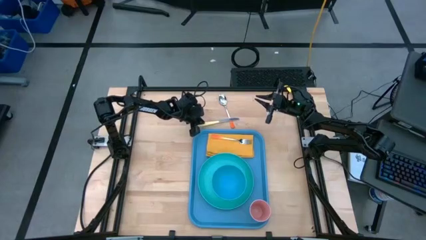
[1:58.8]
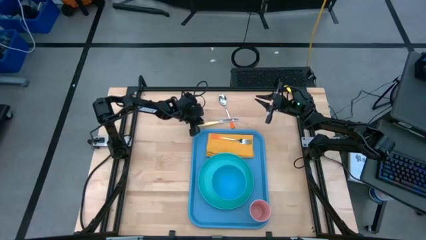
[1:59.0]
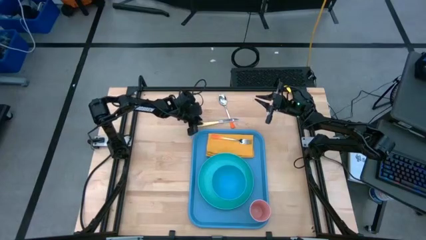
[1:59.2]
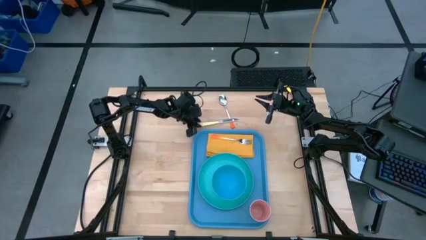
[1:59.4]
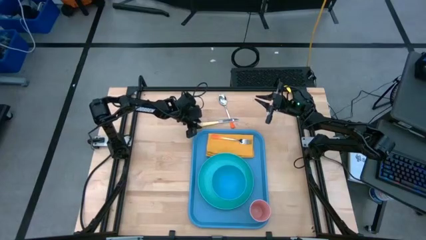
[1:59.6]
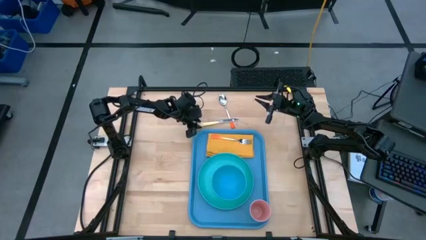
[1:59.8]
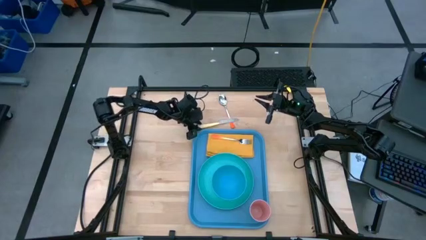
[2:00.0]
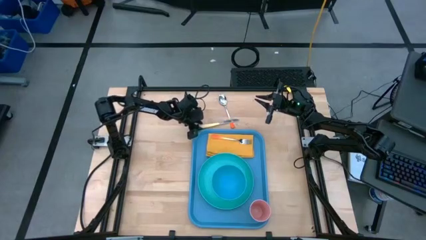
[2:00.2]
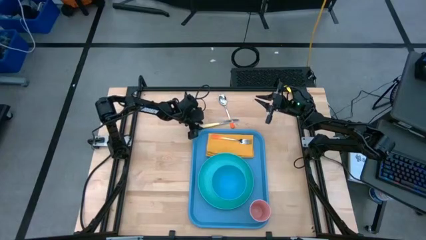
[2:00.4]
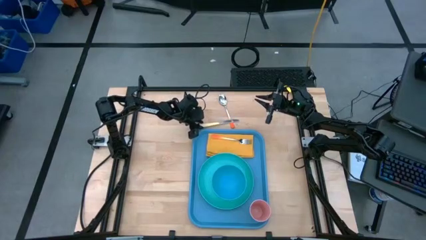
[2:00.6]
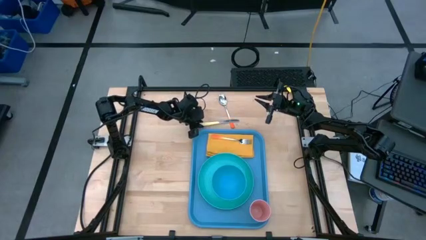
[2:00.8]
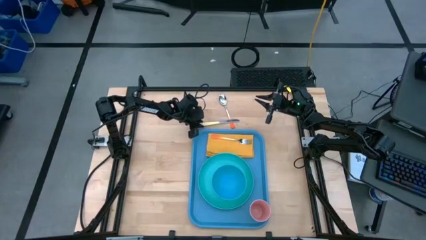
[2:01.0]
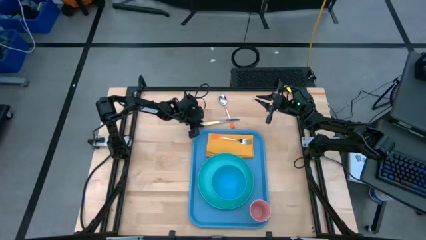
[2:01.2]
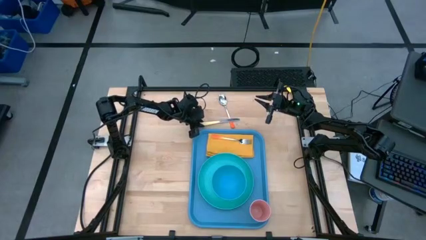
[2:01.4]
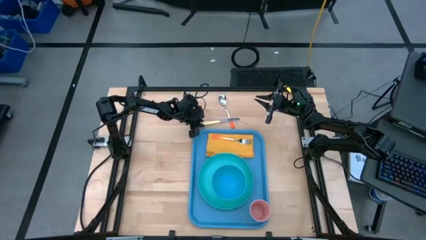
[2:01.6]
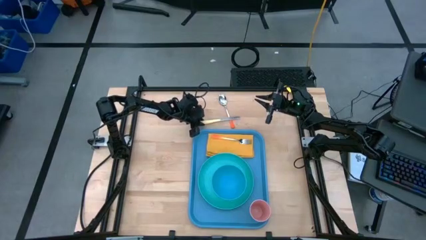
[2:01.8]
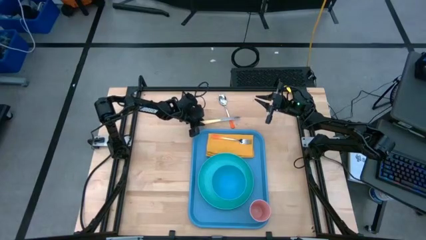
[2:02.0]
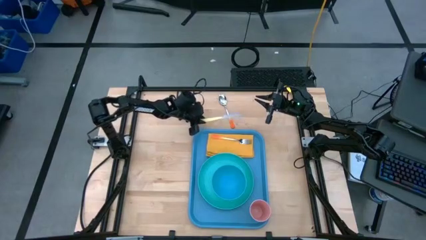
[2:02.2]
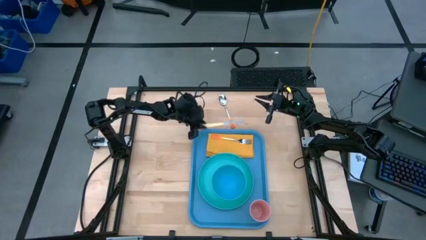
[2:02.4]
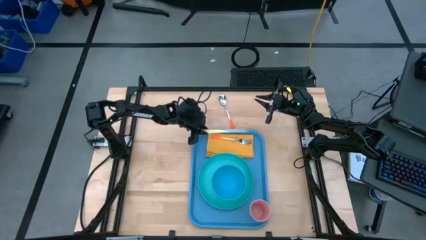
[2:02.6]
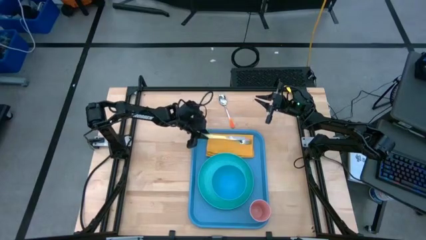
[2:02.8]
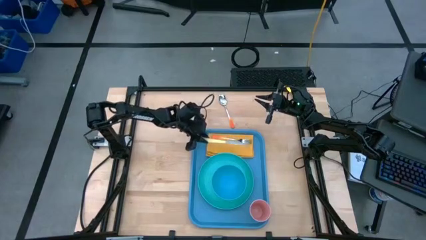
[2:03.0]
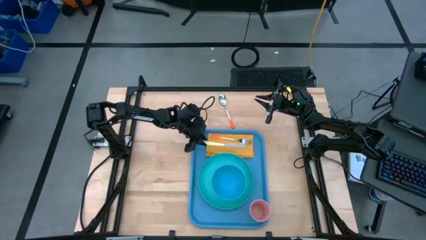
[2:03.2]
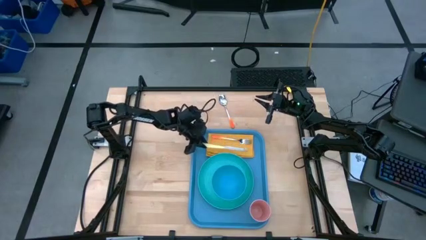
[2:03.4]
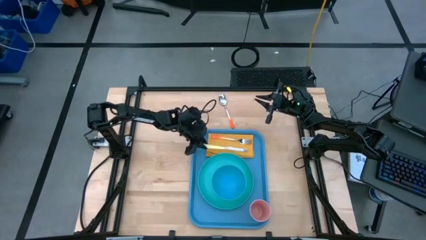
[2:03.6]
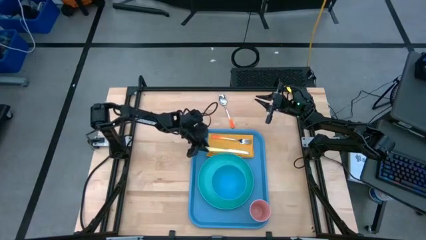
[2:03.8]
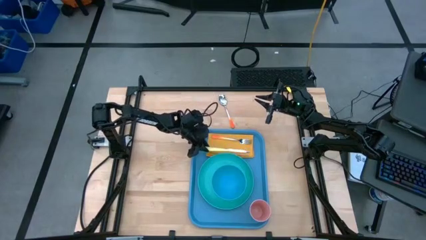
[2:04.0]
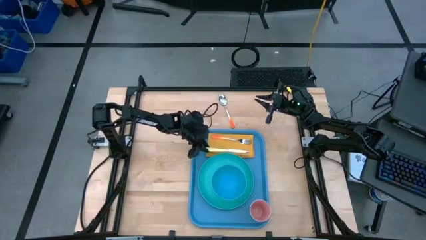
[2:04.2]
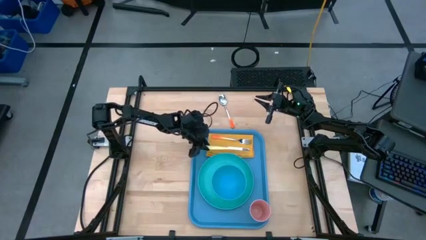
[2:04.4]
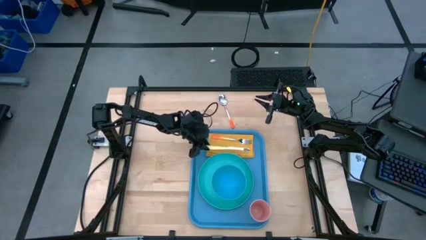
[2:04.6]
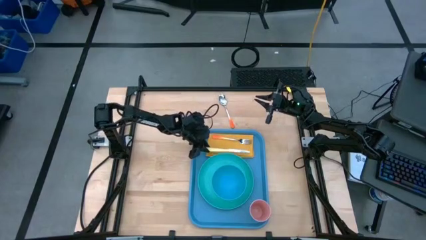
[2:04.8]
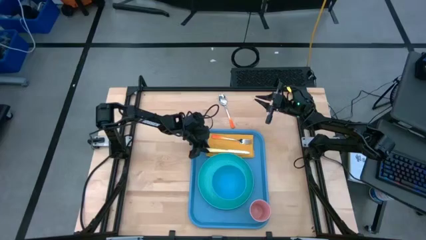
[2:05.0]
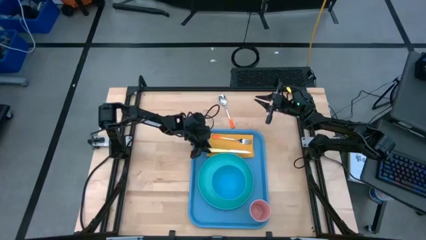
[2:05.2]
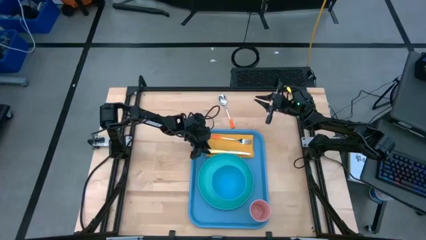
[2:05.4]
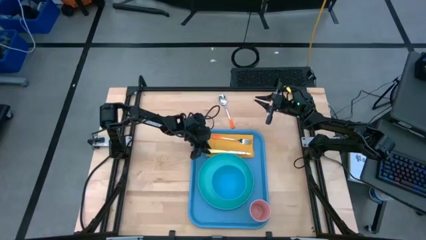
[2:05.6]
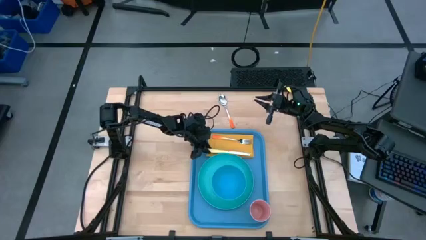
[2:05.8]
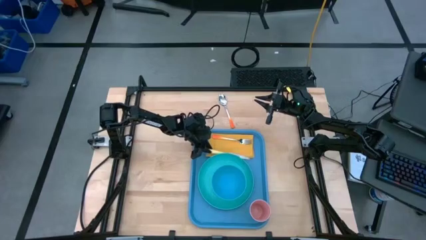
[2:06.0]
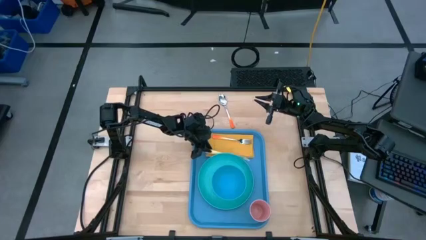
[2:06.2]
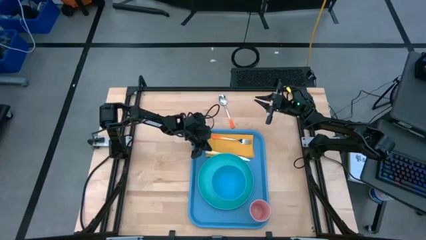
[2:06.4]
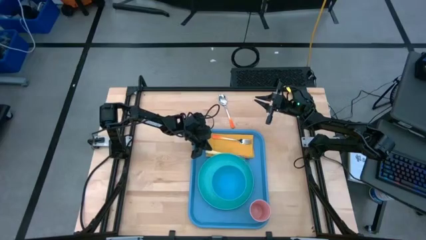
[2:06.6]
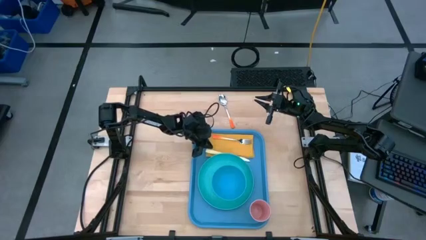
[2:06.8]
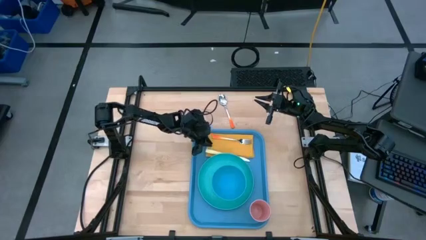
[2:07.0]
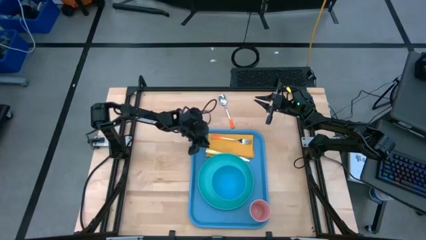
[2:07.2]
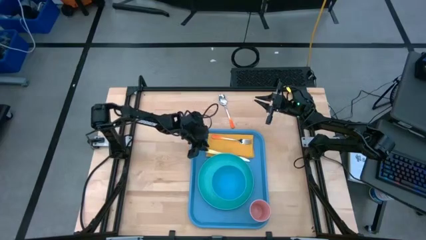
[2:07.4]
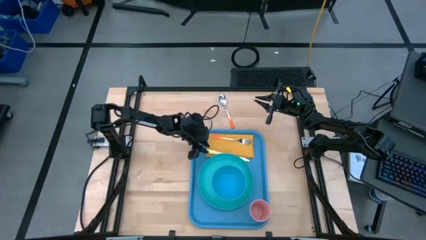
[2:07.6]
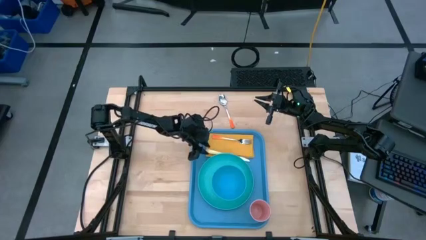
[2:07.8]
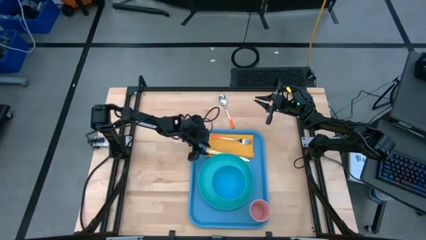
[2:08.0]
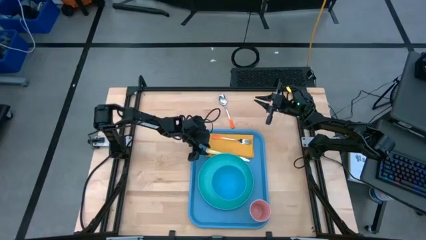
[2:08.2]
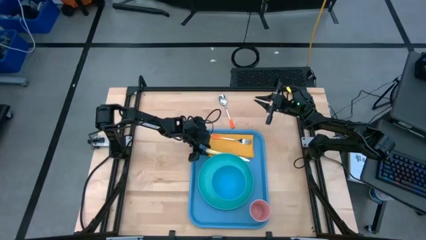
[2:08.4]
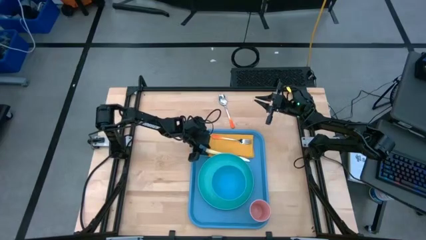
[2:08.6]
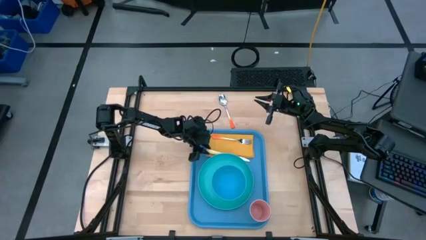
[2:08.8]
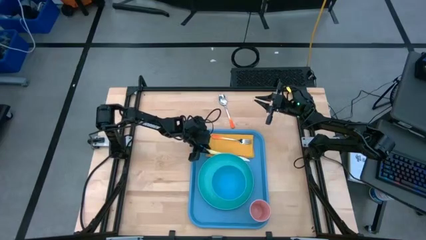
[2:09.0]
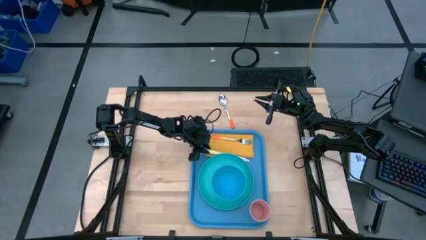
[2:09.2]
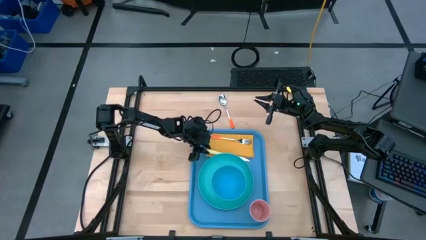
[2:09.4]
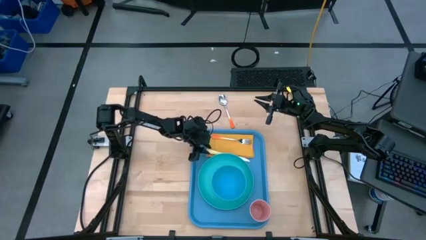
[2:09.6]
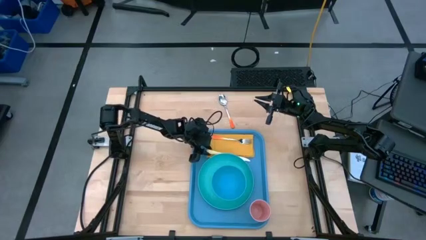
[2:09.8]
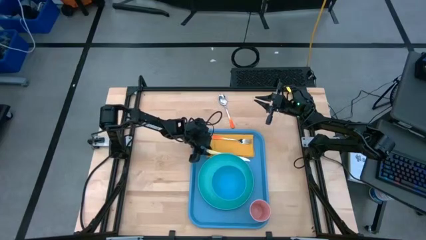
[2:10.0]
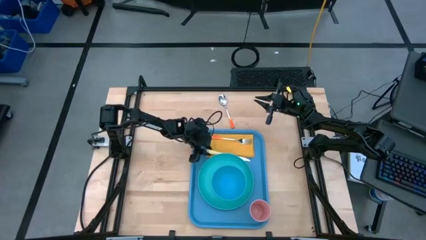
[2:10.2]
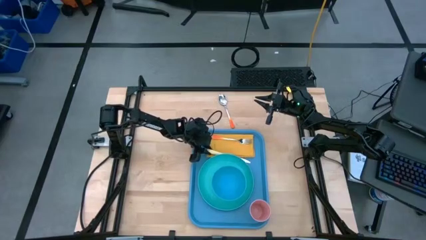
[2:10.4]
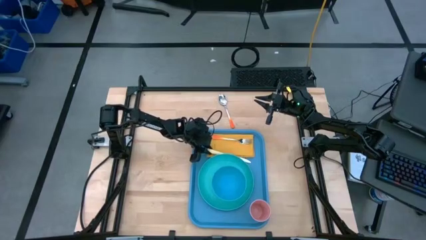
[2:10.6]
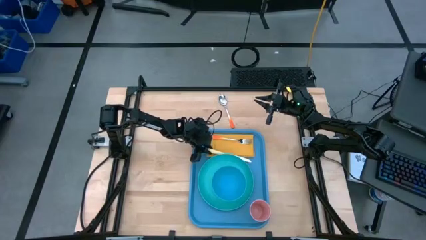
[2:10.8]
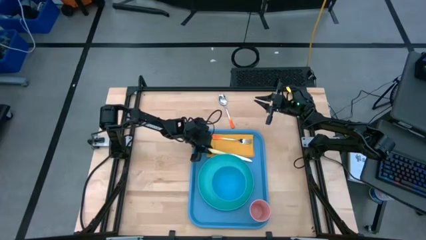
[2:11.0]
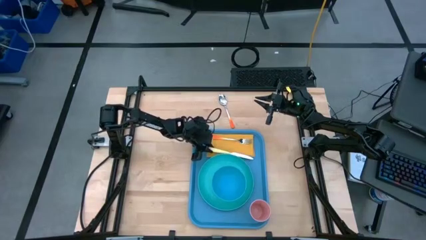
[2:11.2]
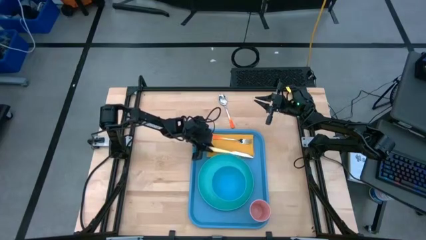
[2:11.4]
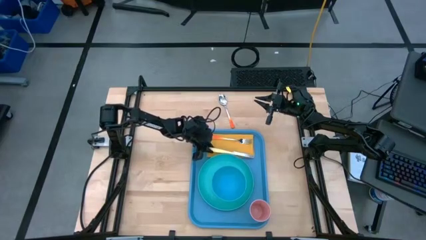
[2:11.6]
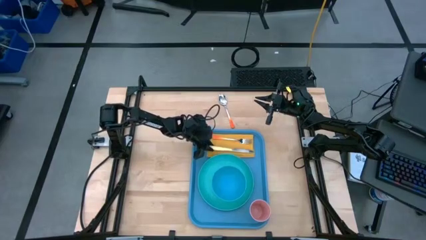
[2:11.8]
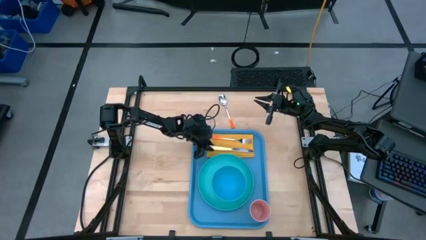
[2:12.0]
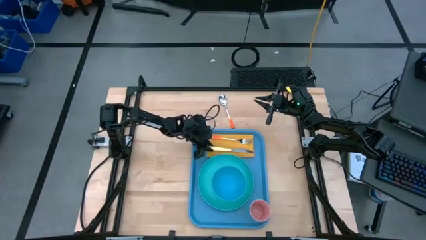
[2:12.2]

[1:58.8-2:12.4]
Task: Set up tray
Put the yellow knife to the right of the orange fork on the yellow napkin on the blue serving tray

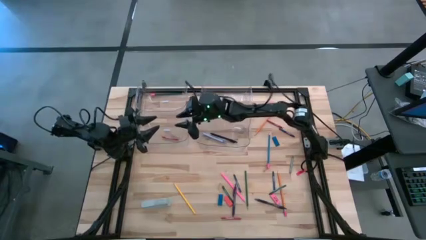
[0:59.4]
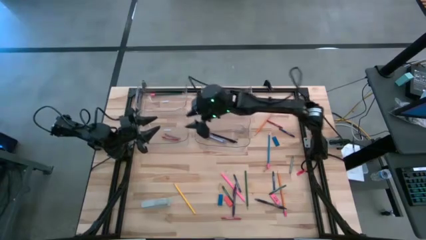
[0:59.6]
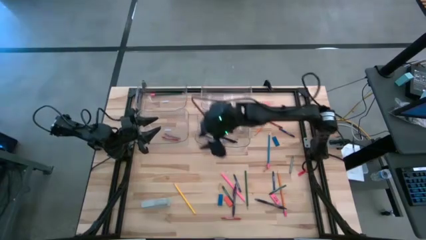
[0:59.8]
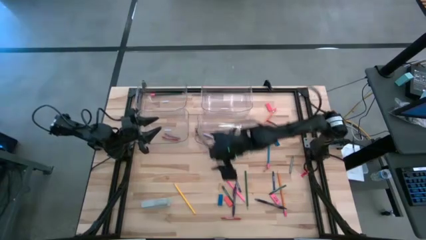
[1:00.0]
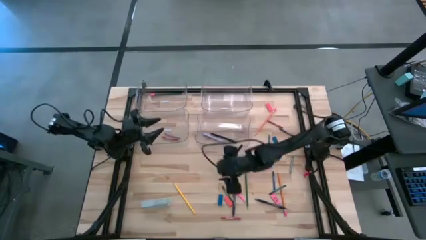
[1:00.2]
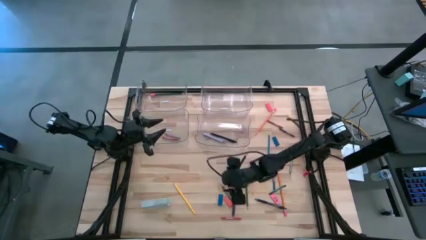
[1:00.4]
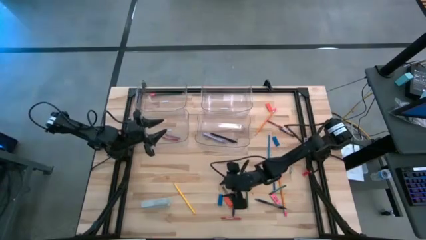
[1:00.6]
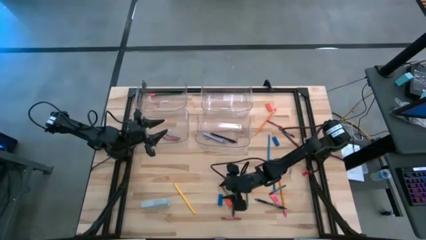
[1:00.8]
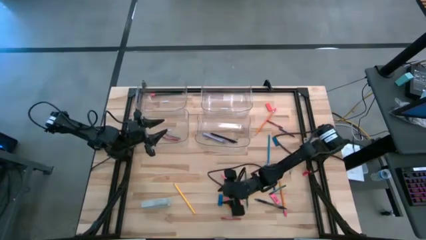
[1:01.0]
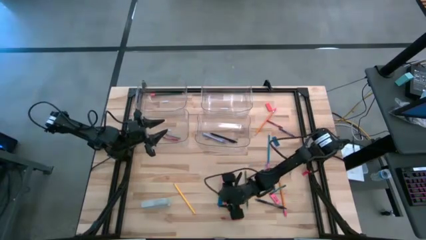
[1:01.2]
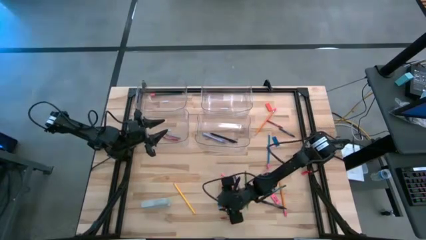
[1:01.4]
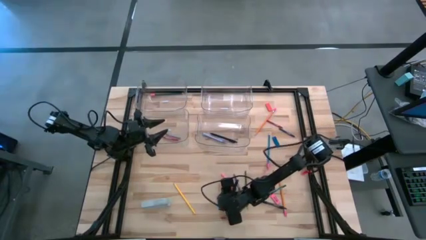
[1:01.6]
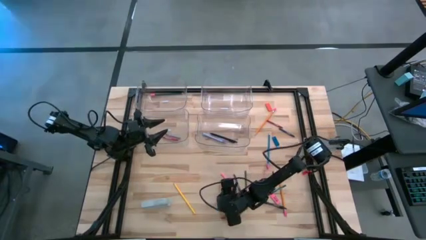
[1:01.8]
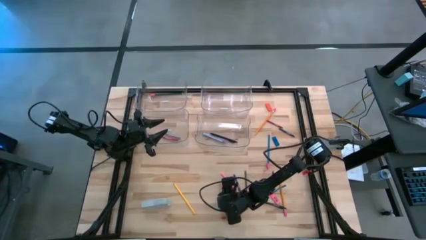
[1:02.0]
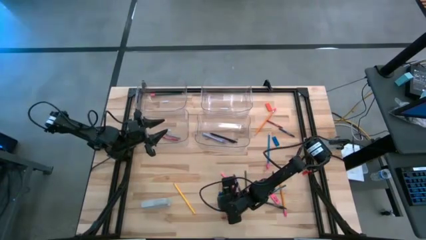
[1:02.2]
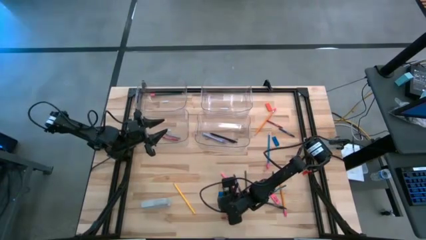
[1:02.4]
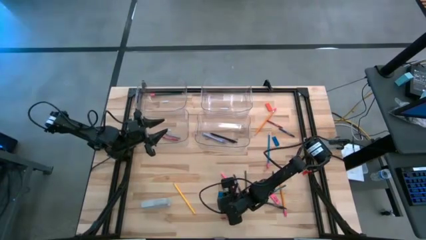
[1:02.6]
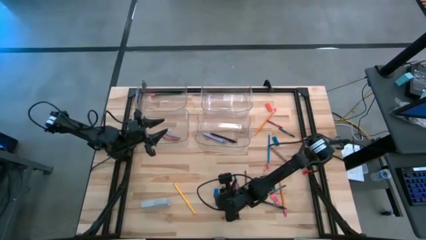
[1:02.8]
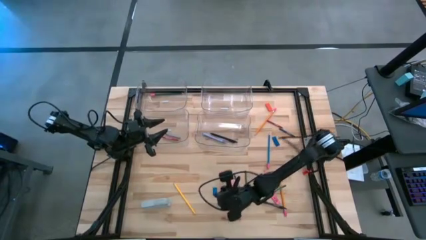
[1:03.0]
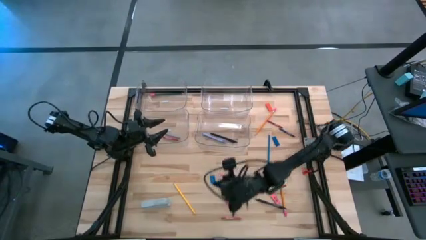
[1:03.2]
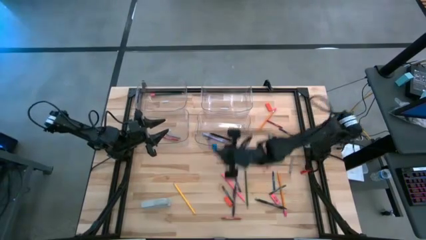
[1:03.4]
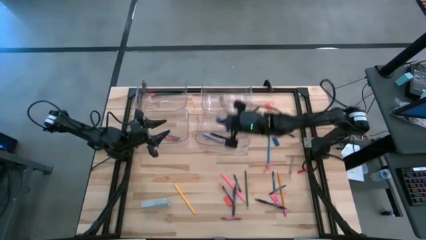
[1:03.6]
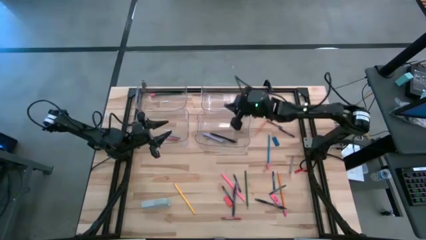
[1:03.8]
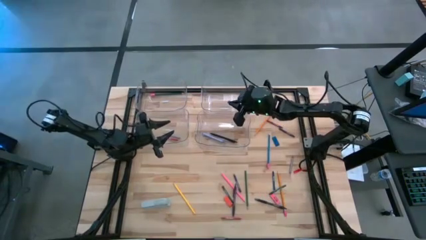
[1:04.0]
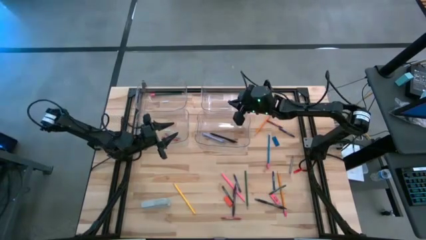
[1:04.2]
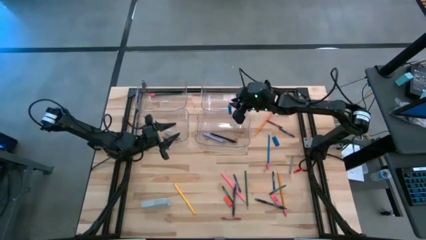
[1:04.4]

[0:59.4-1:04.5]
Task: Sort crayons/erasers/pens/pencils in bins
Put the bottom blue eraser into the top right transparent bin
